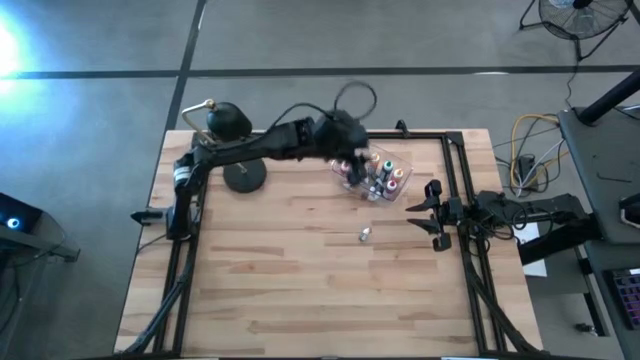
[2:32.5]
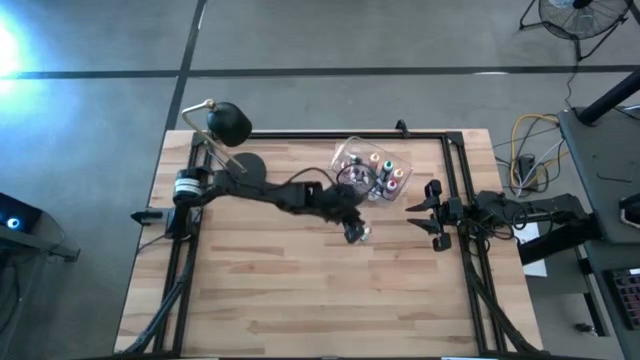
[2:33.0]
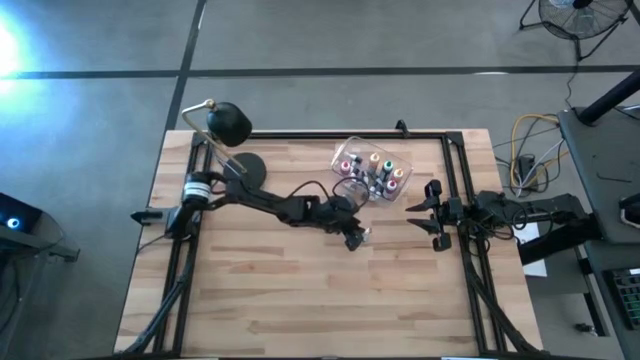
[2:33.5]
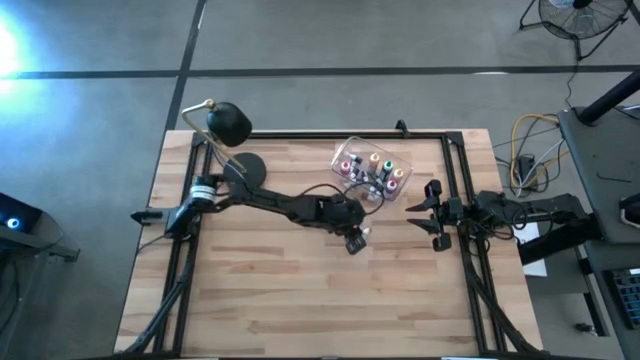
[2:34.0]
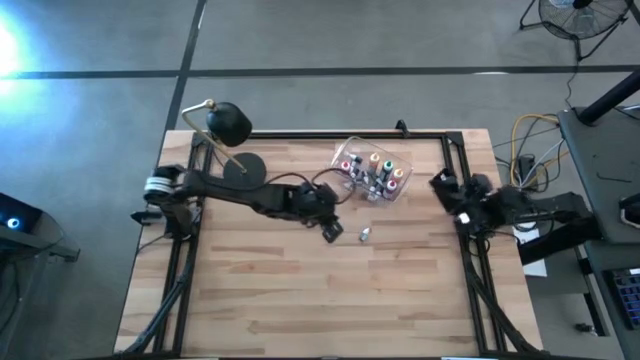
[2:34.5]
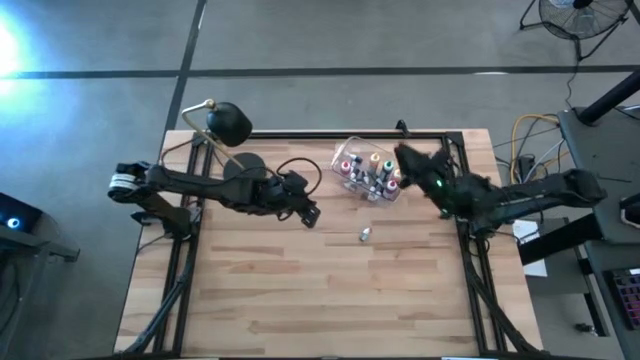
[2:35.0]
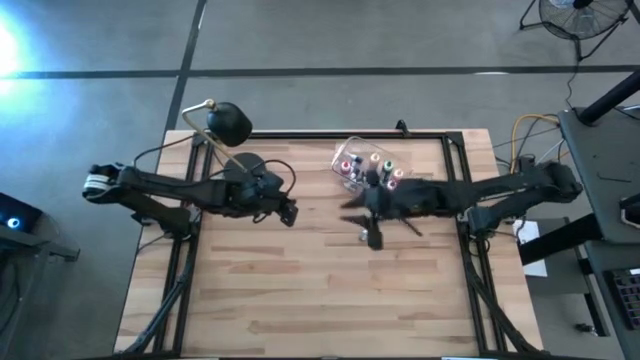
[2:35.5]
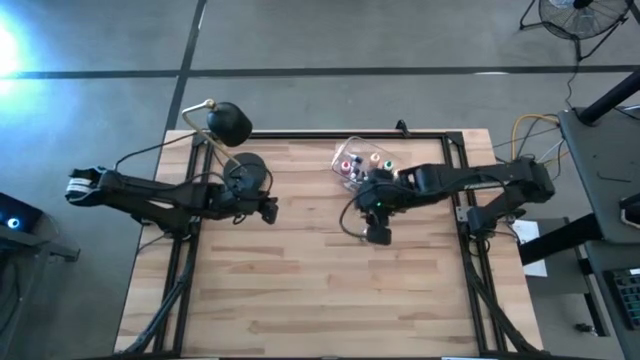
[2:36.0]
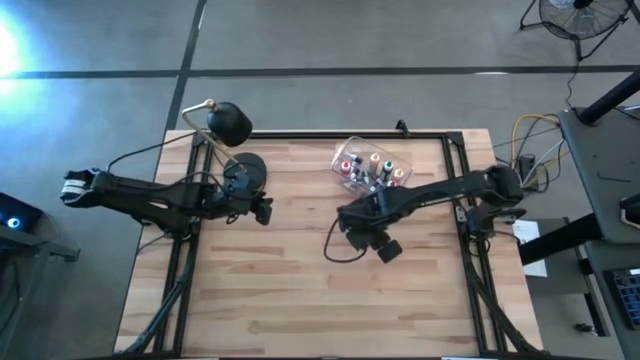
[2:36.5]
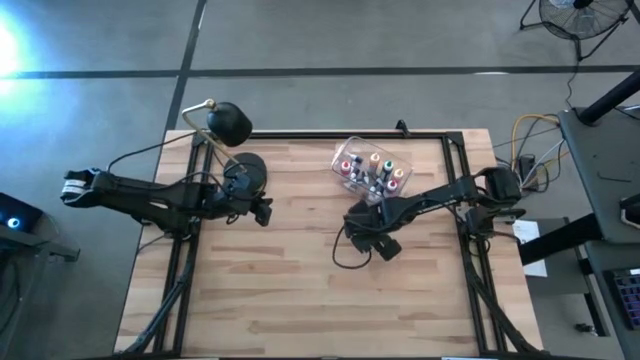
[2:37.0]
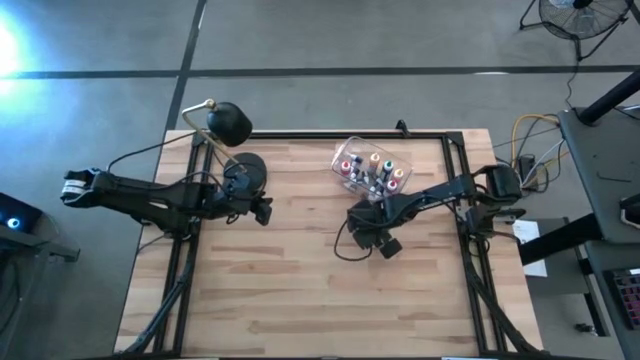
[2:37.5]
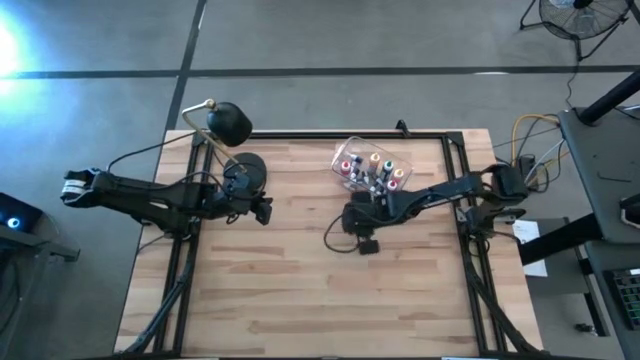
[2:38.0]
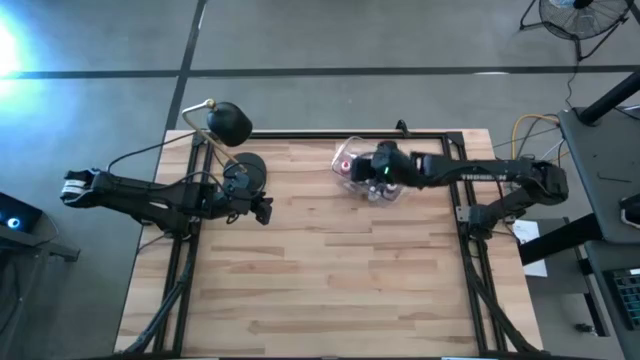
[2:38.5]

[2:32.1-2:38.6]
Task: Pick & Place food coloring
Put the small green food coloring bottle into the transparent bin

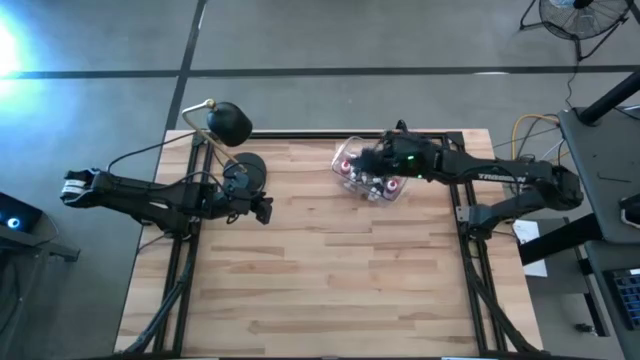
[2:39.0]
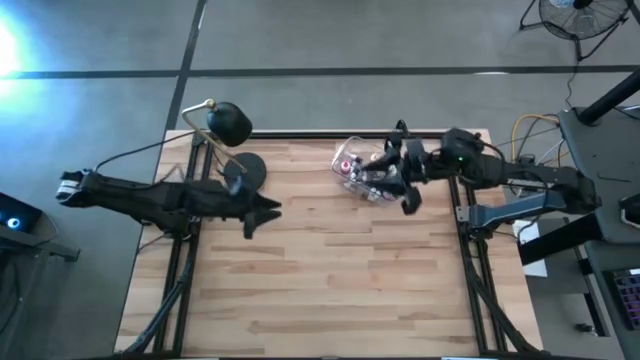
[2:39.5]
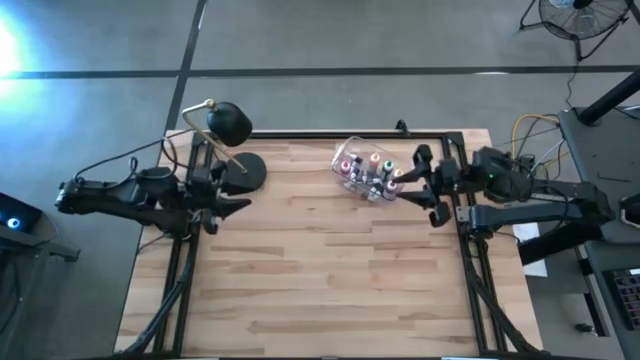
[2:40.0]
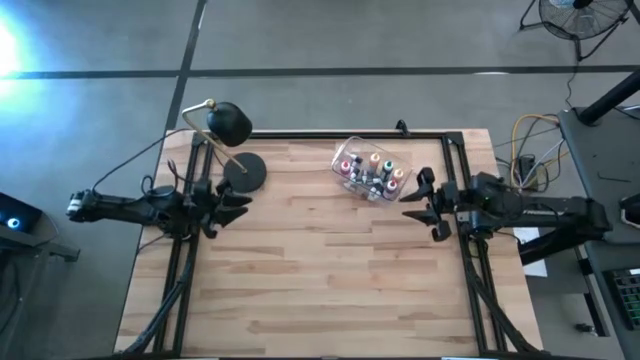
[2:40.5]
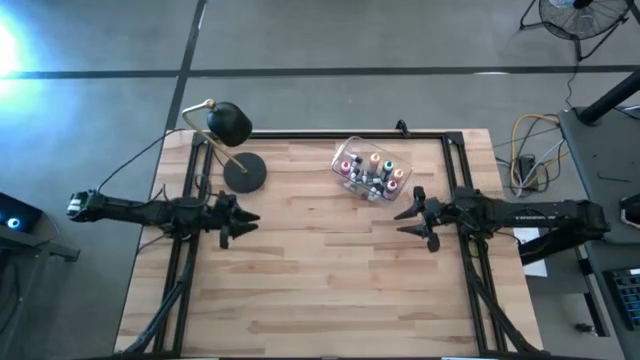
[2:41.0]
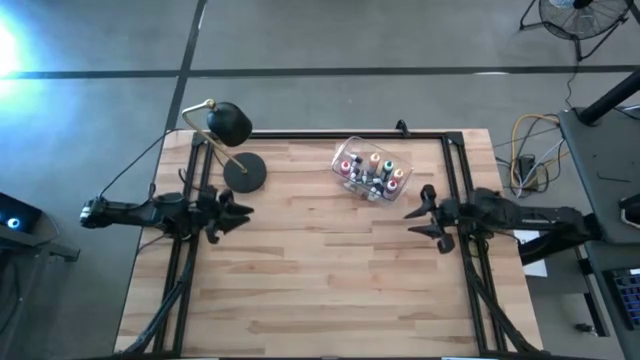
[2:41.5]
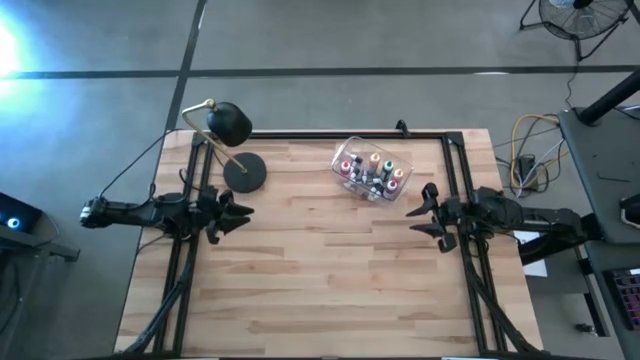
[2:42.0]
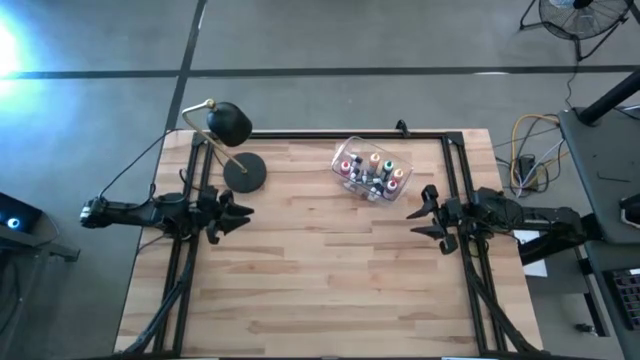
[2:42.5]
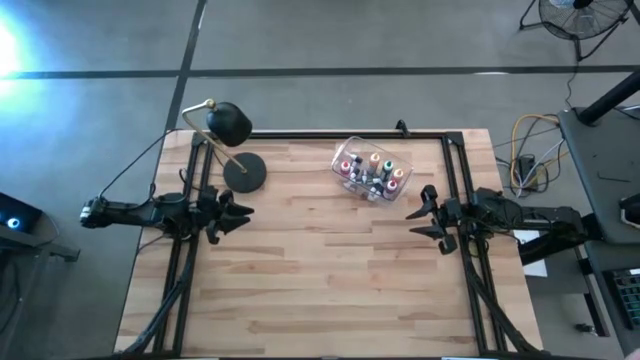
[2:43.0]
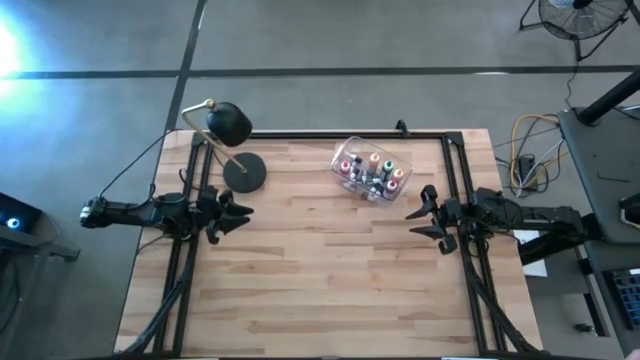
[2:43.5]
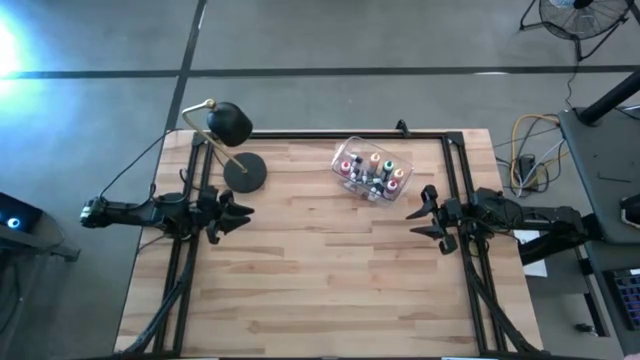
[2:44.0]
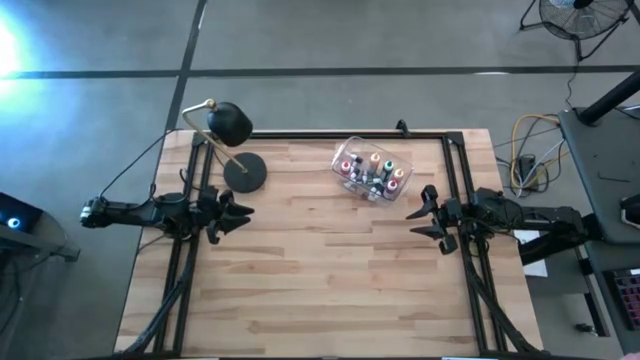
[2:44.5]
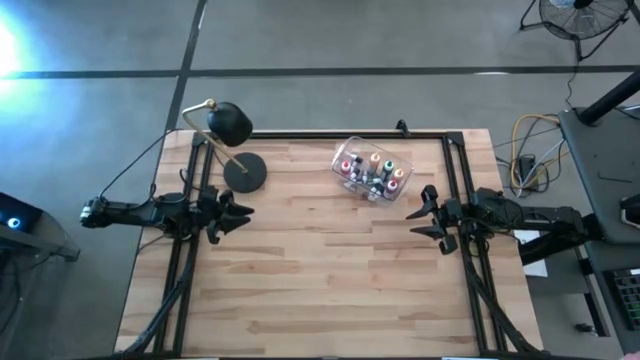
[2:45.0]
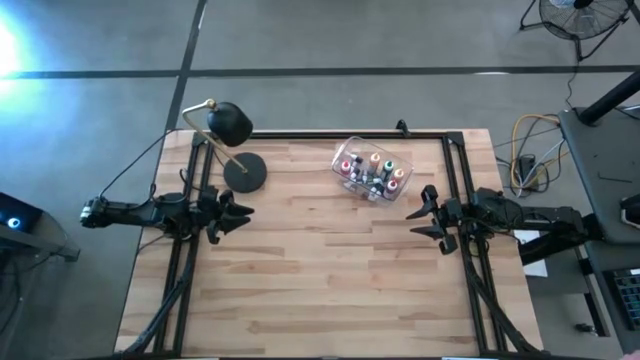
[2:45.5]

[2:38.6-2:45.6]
Return to Home Position

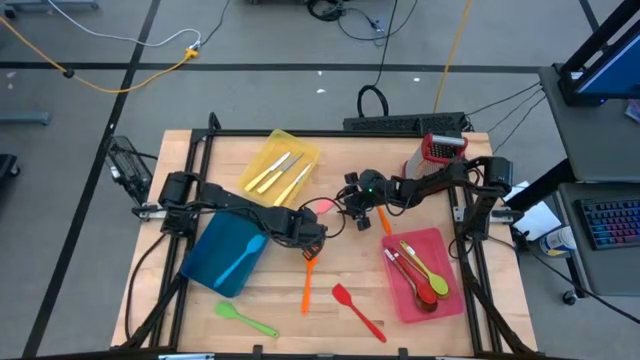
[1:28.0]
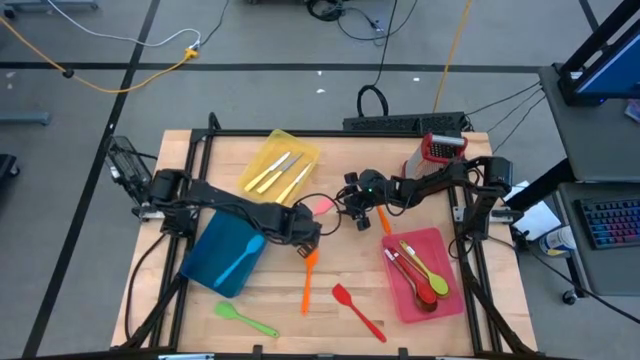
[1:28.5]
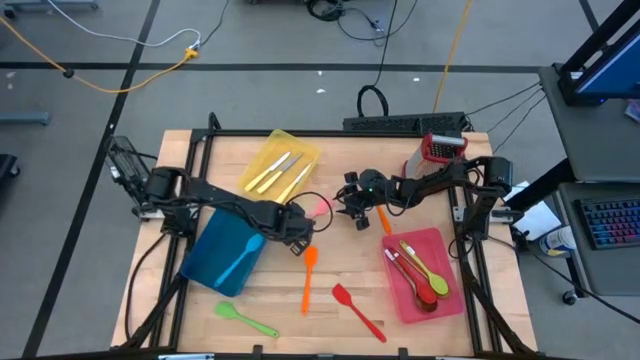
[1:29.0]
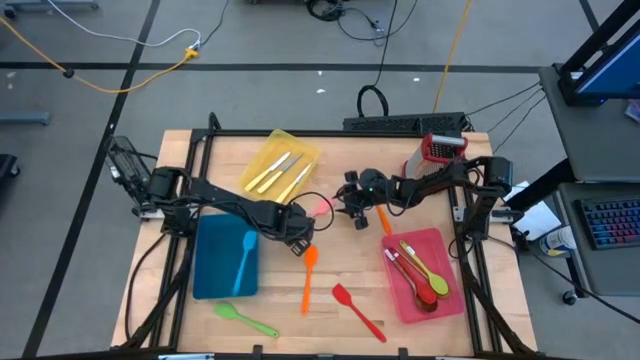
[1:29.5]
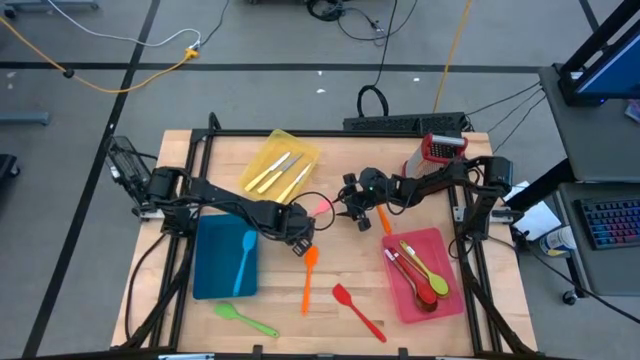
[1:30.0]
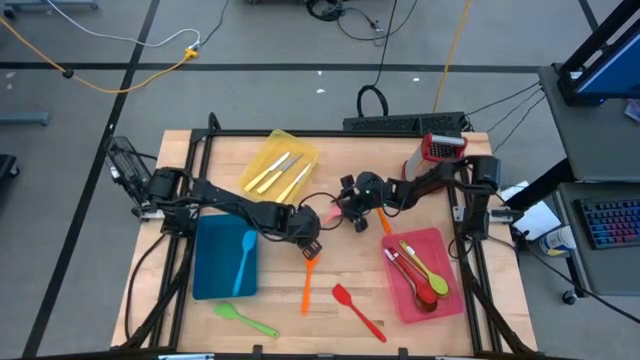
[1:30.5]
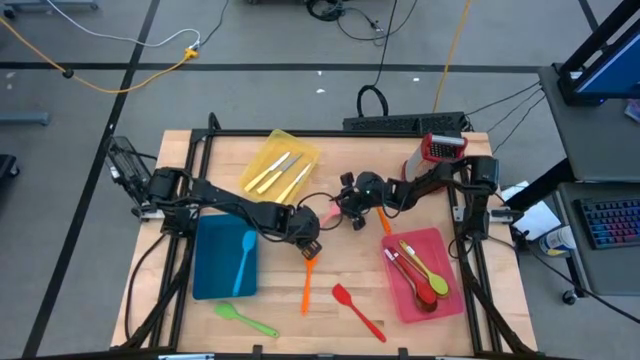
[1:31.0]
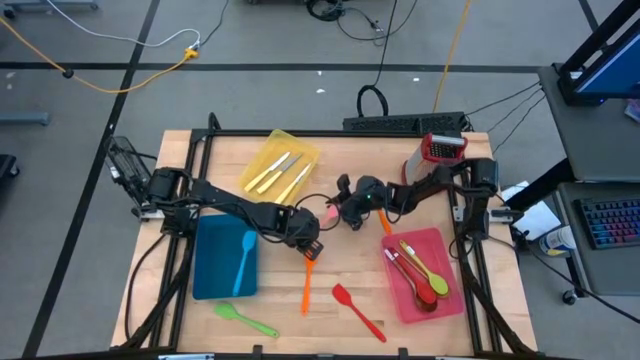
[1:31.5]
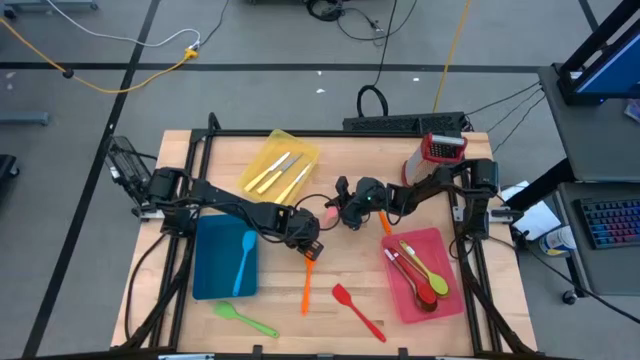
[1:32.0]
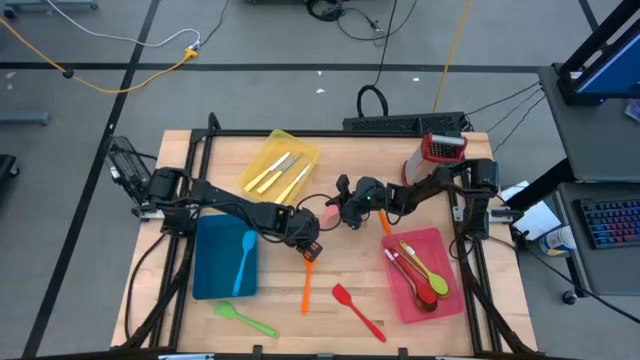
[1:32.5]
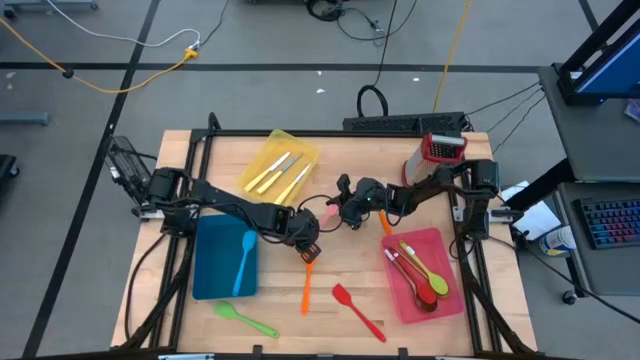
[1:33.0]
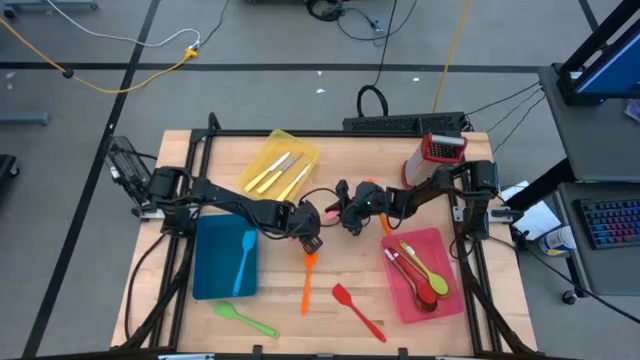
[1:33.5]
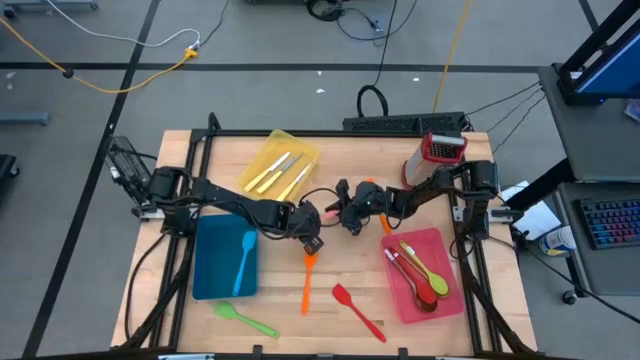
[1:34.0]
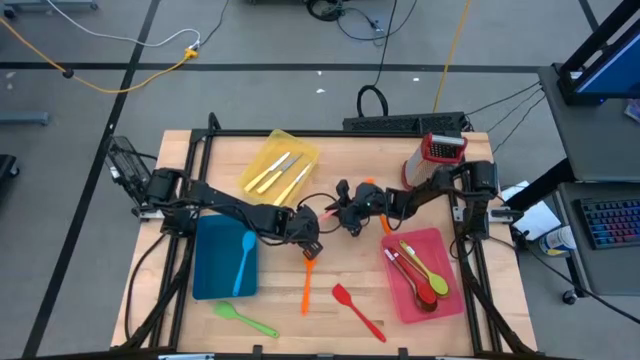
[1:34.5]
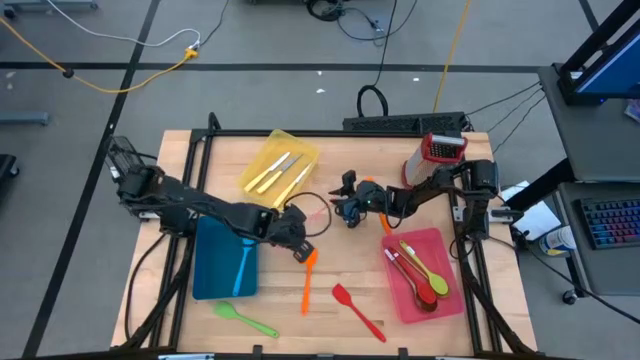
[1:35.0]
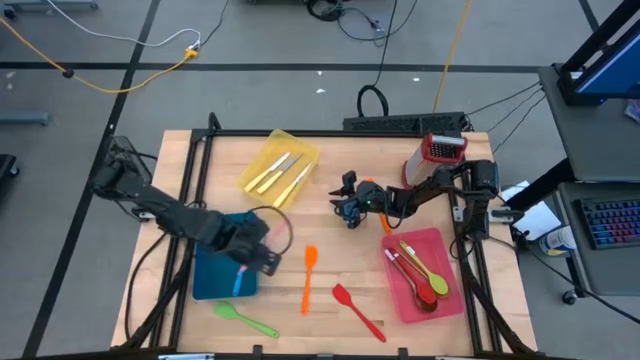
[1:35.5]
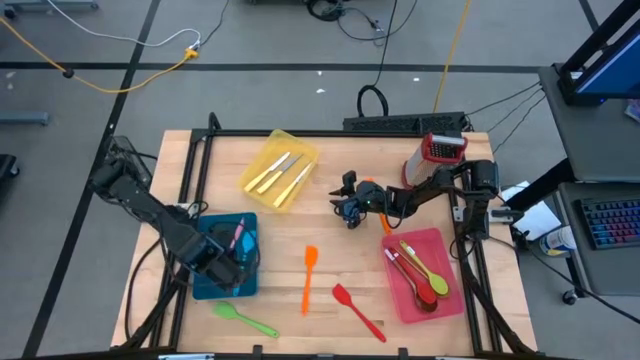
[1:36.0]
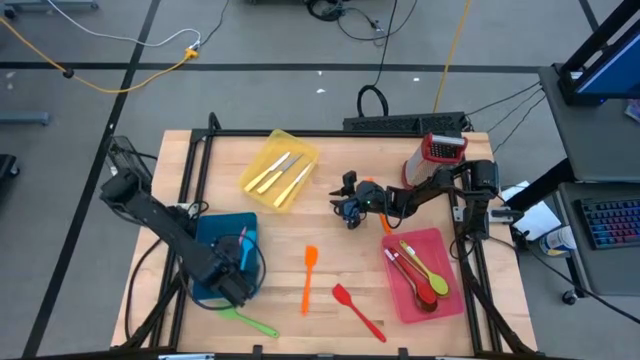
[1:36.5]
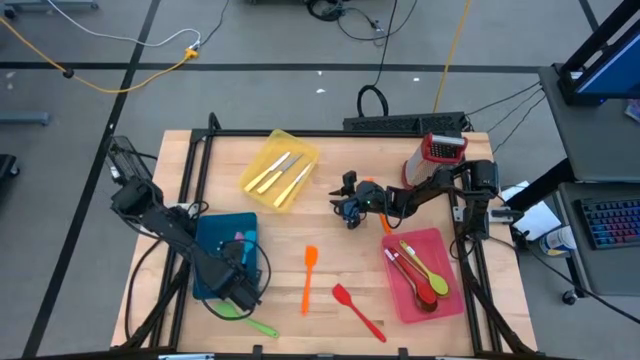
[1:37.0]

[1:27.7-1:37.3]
Task: Pick & Place Kitchen Items
Put the pink spatula into the blue bin
